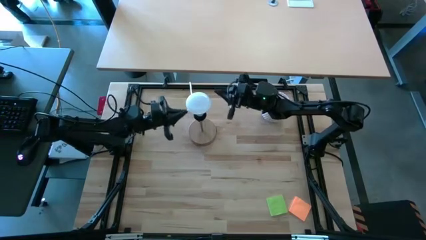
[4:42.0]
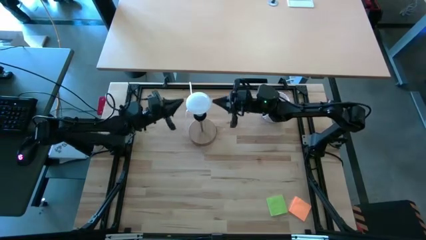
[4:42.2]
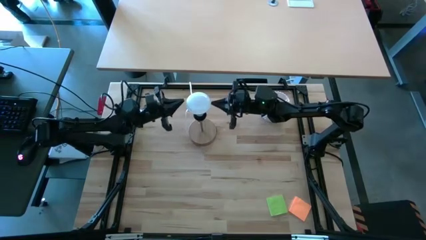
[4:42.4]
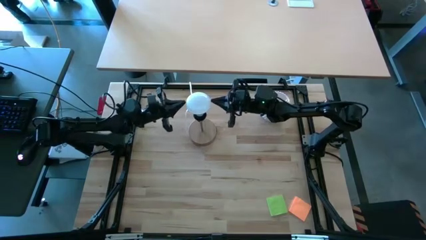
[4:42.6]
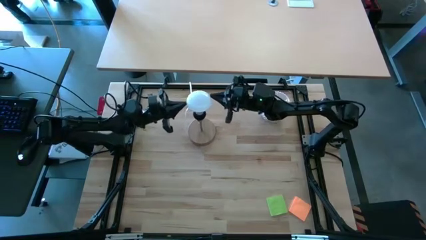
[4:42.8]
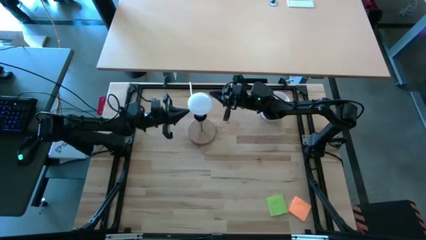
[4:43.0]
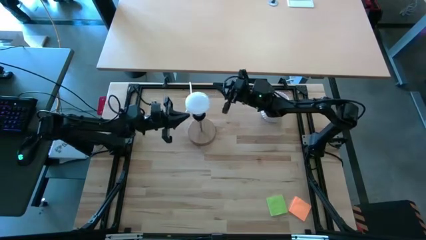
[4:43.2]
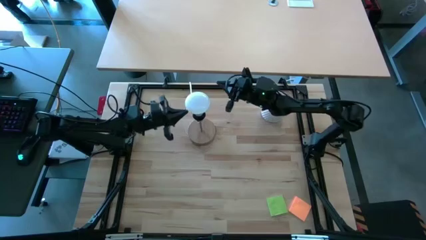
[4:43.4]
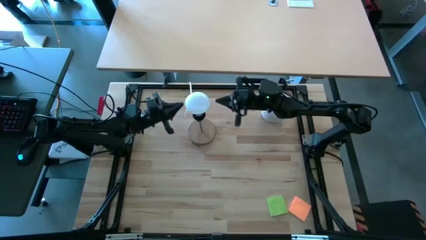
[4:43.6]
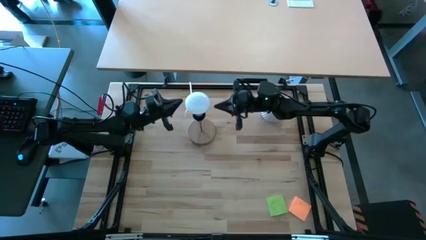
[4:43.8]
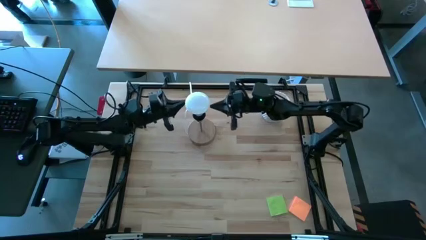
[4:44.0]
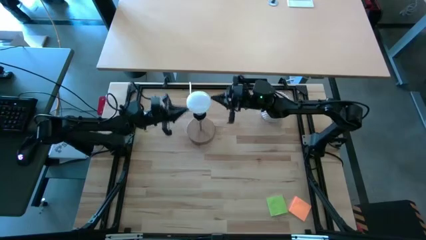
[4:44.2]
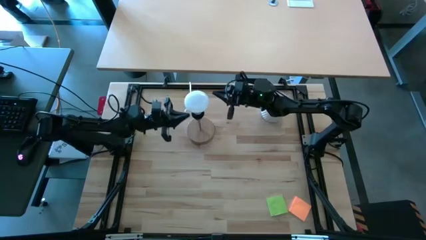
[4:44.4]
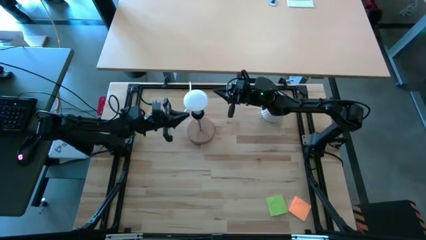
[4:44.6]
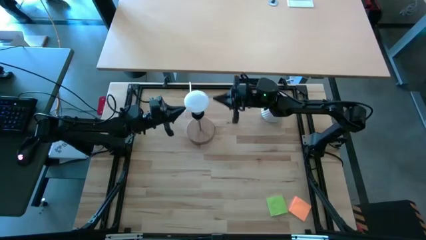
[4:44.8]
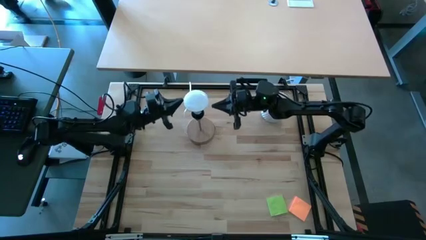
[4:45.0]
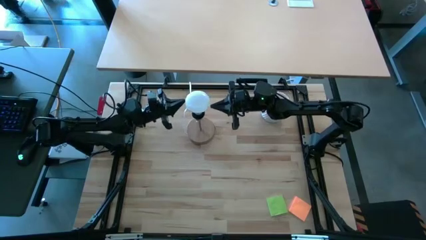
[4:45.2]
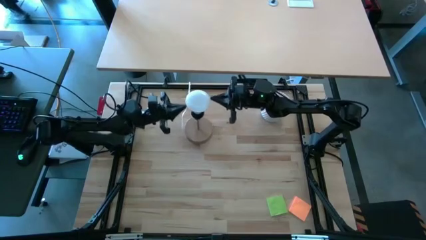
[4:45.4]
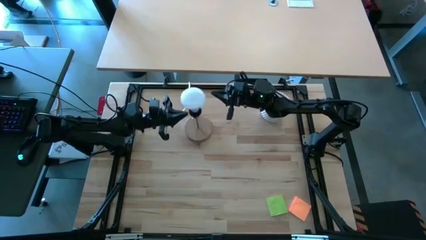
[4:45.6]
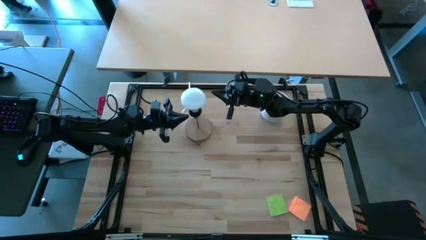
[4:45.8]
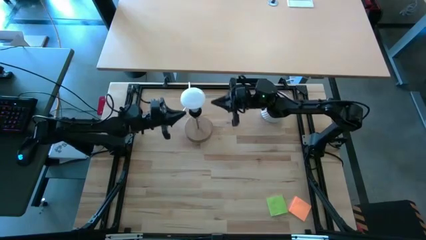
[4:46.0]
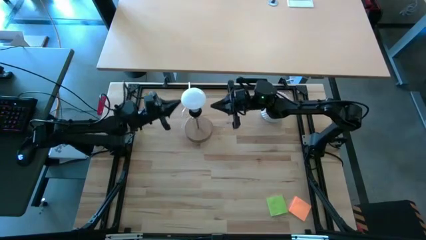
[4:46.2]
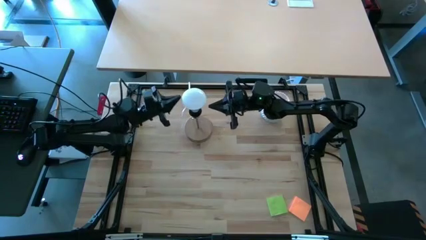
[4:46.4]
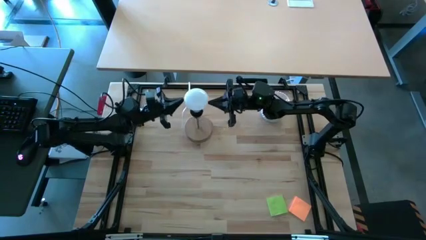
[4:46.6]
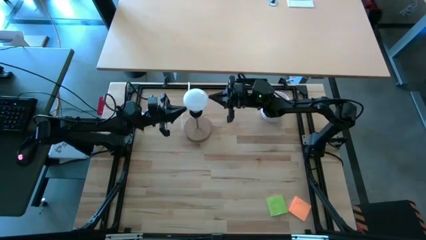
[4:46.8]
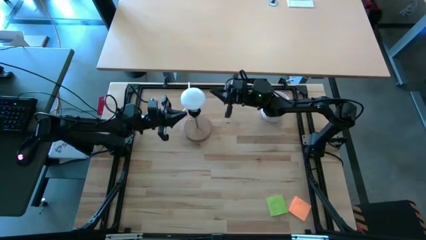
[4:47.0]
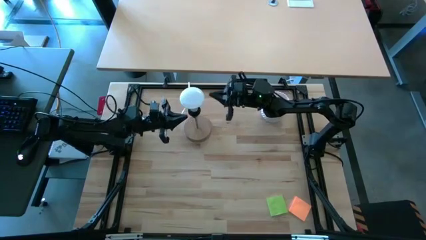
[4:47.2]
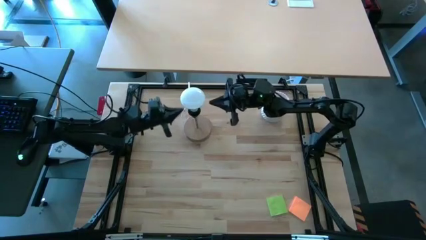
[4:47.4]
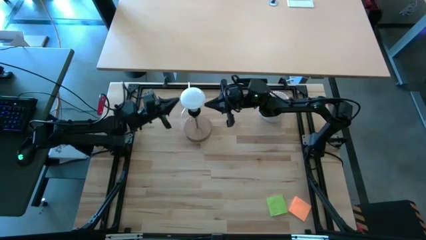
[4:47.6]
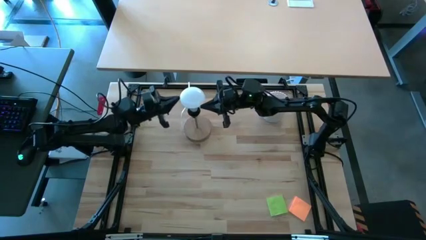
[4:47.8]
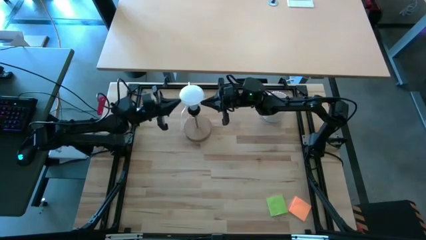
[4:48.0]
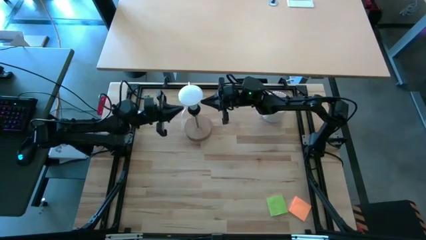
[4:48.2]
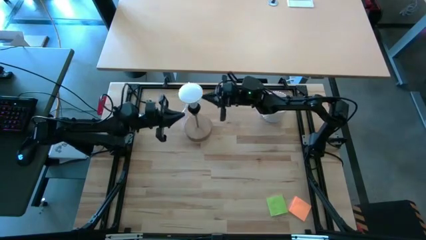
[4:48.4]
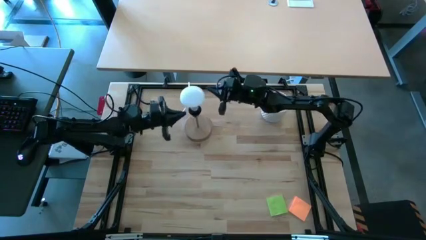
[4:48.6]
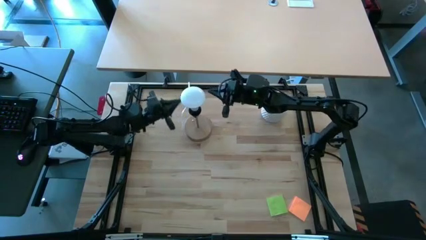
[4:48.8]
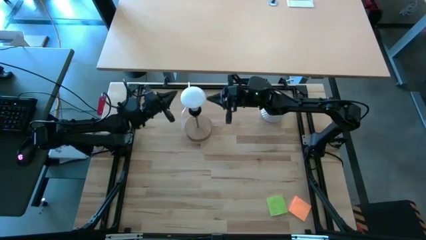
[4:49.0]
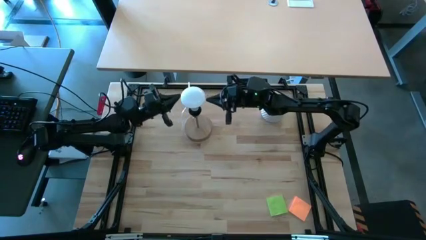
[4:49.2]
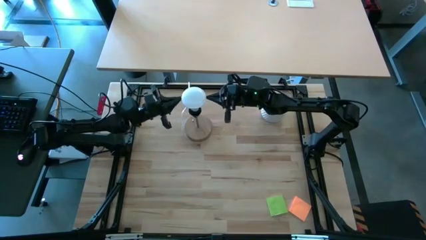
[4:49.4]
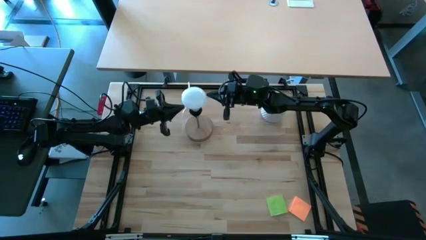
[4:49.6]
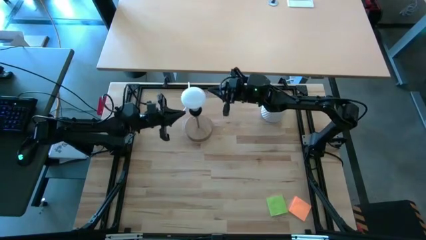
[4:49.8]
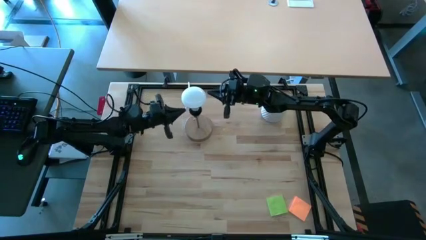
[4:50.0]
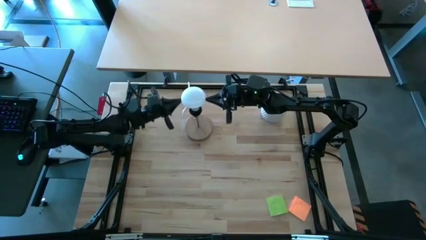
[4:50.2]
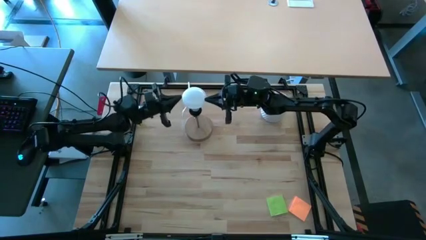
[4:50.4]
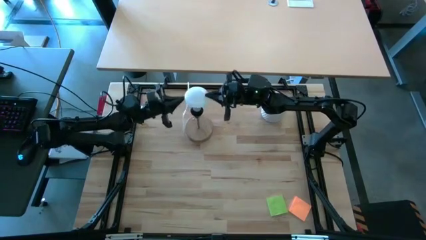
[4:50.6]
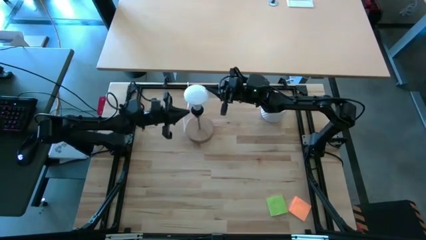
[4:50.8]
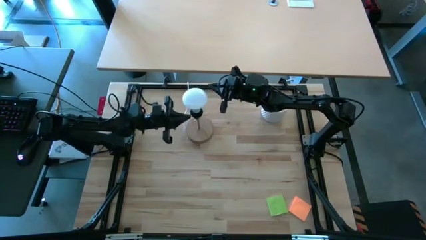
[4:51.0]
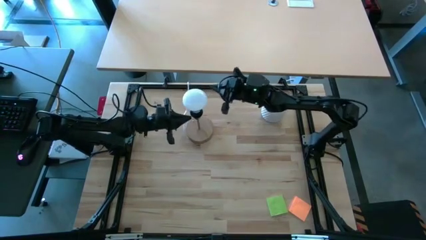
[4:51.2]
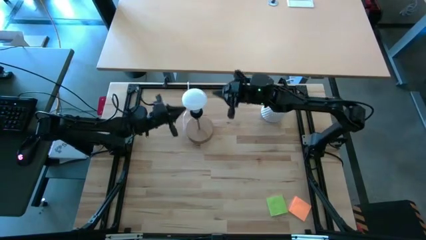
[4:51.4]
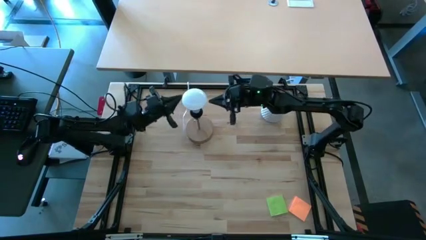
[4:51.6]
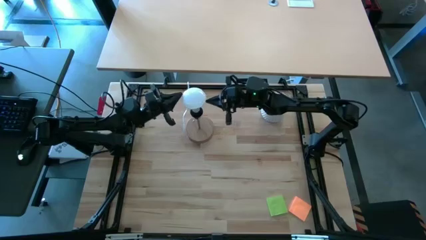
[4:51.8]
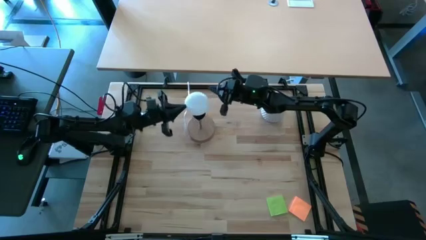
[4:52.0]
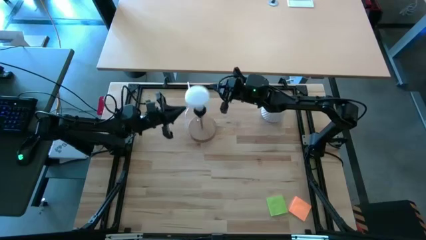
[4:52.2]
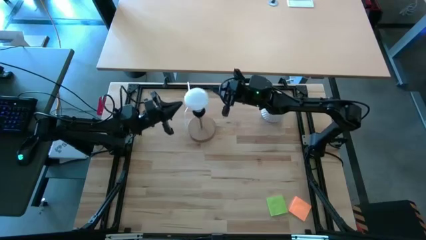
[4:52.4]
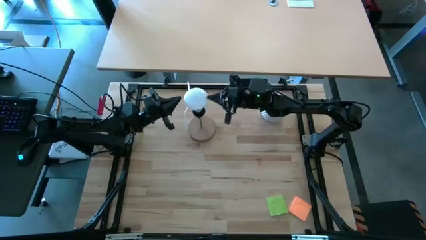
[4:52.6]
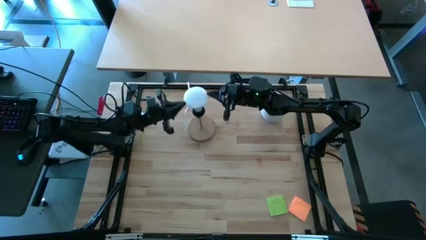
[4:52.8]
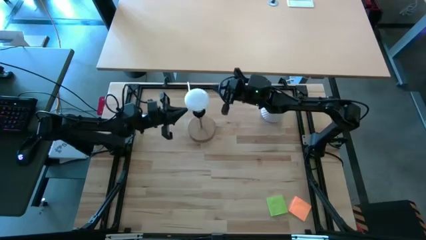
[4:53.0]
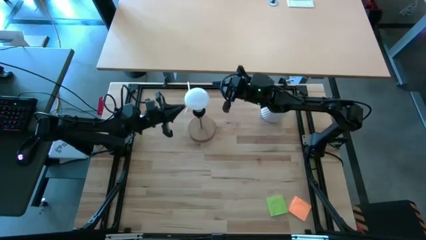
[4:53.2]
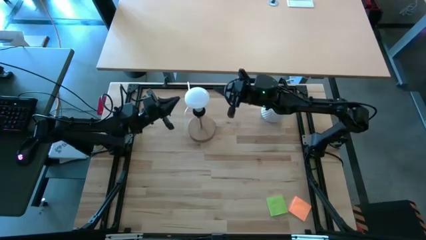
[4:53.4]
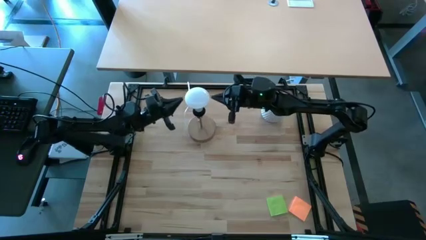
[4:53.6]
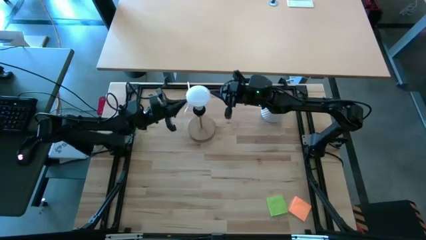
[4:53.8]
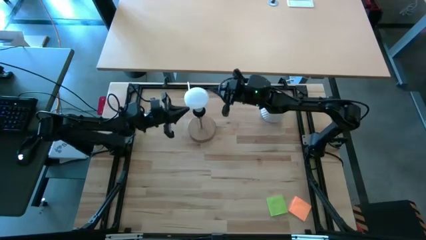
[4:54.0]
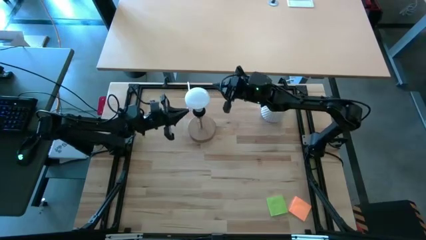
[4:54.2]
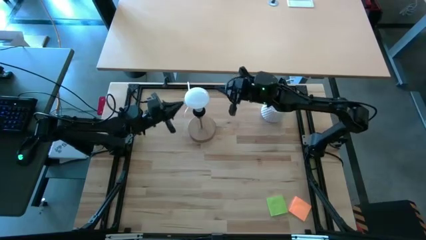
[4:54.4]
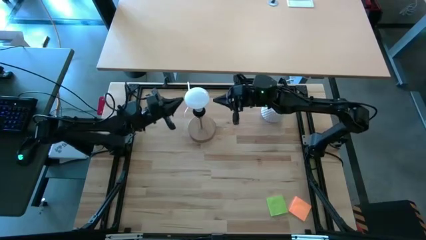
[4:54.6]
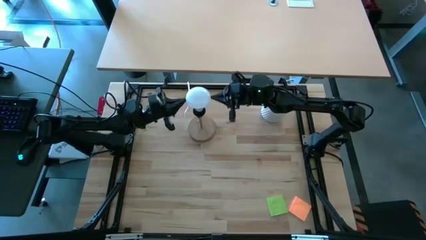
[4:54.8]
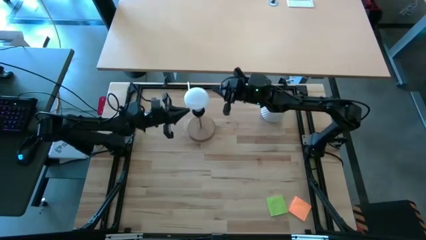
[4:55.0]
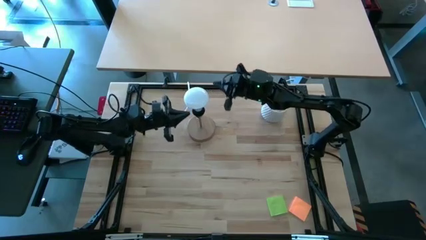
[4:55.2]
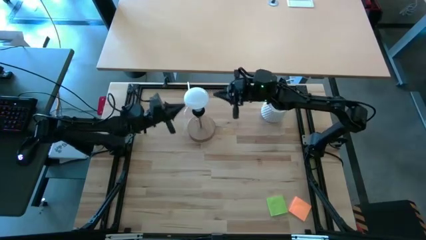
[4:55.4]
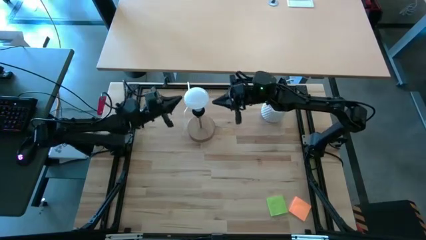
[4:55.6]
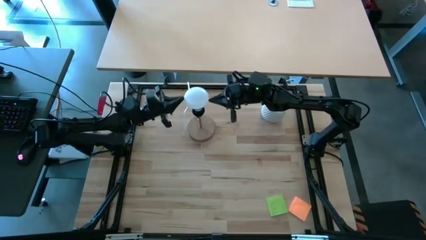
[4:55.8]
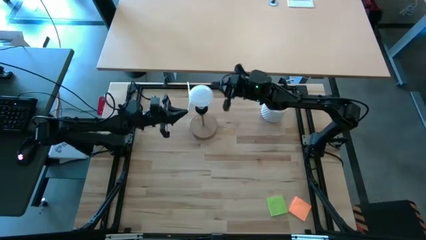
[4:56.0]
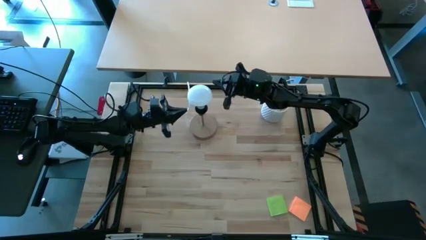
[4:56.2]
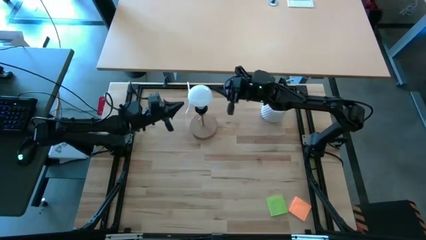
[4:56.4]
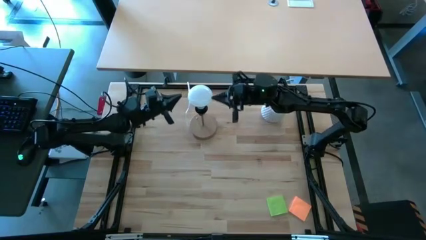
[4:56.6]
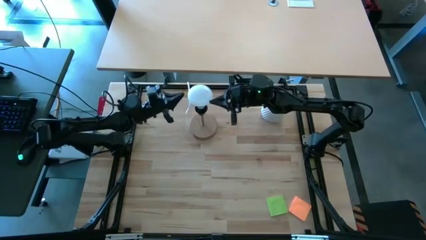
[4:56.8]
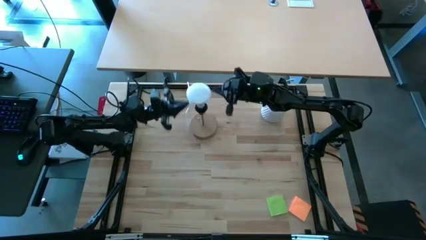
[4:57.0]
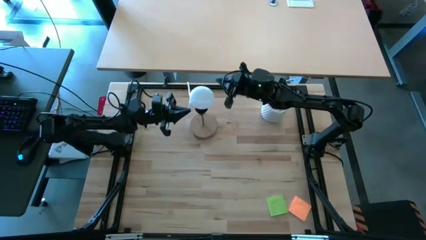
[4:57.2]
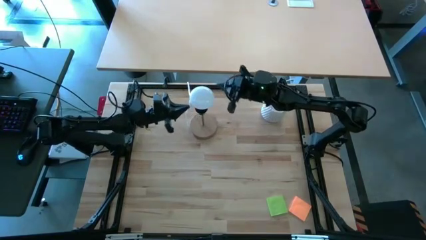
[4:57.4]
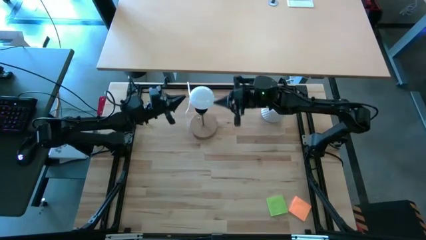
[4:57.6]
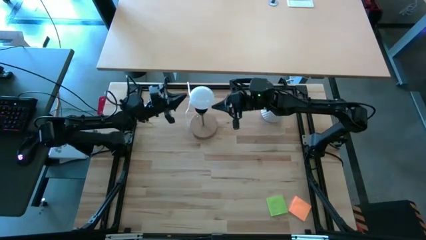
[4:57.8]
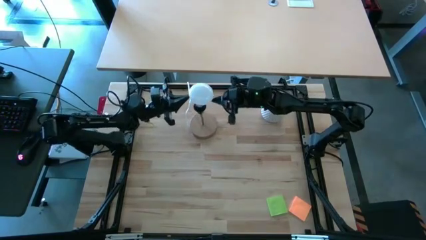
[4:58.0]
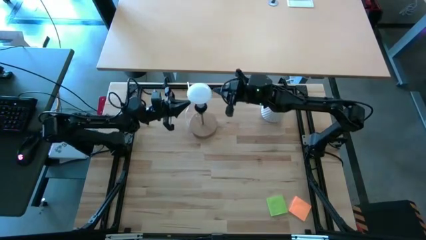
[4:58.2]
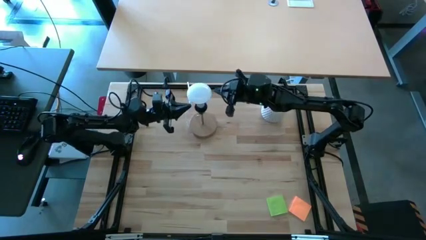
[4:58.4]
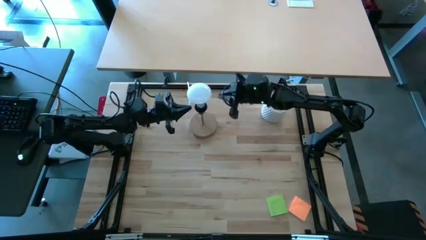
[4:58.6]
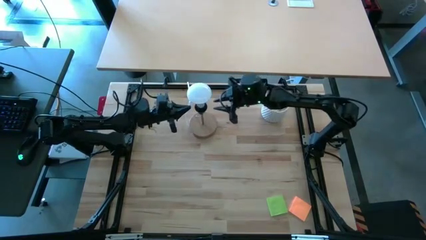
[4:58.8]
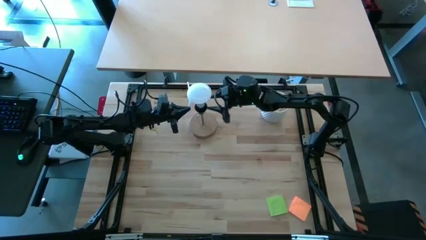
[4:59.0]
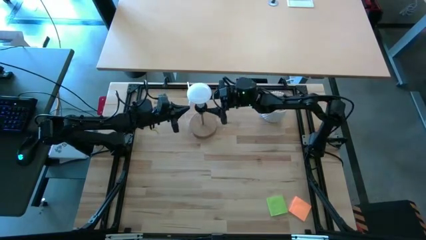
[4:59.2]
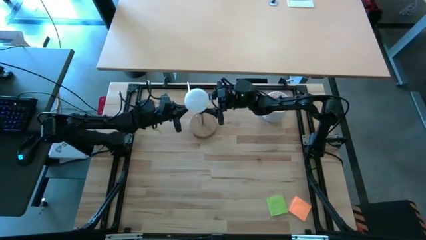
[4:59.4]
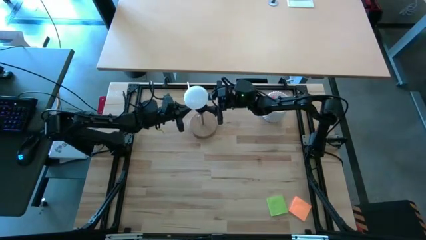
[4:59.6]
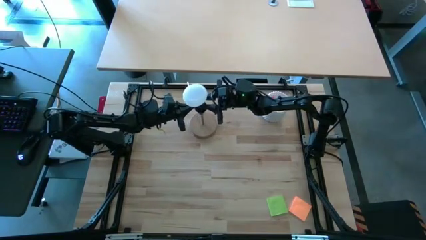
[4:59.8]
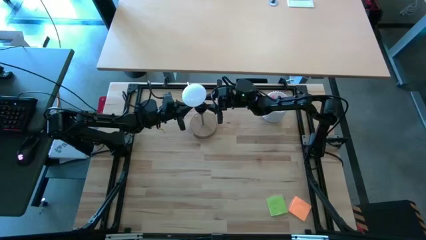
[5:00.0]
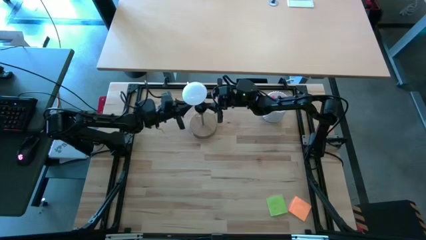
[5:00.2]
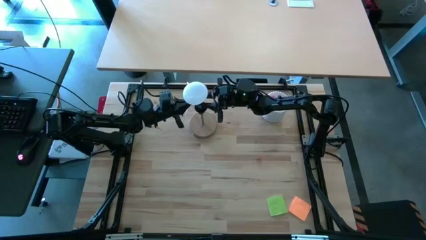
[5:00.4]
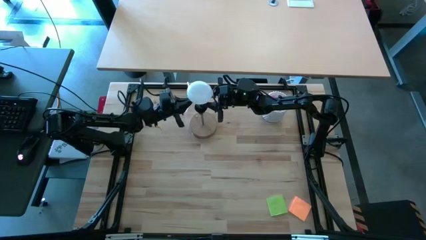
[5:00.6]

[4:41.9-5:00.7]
Task: Screw lightbulb
Remove the lightbulb from the lamp
